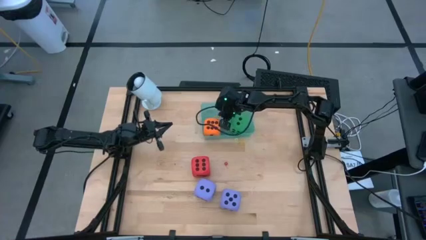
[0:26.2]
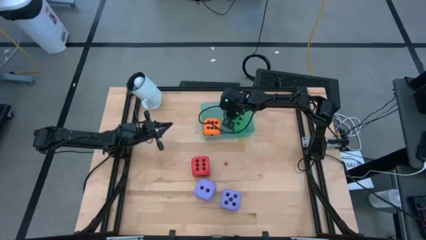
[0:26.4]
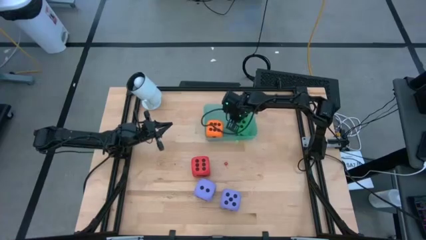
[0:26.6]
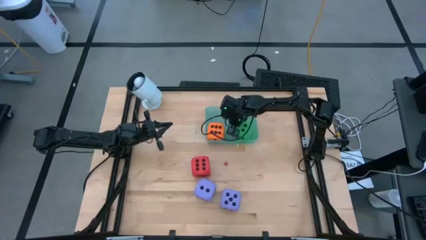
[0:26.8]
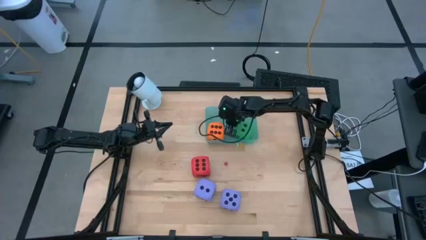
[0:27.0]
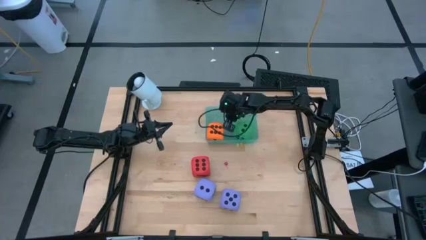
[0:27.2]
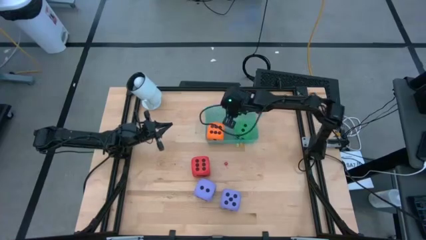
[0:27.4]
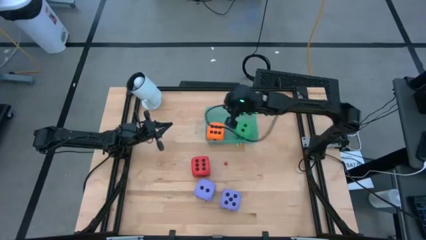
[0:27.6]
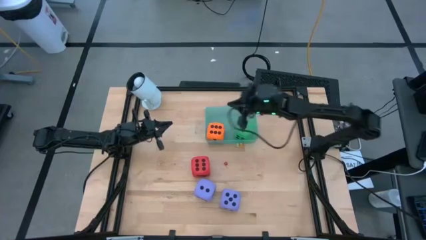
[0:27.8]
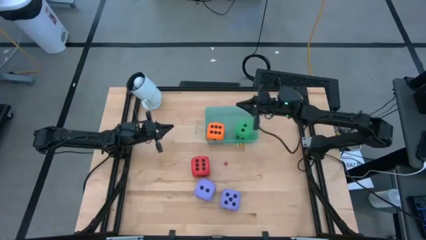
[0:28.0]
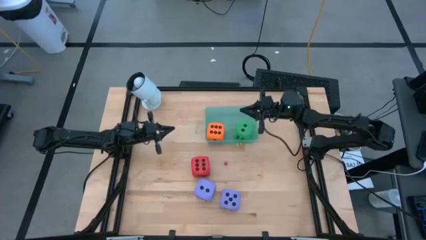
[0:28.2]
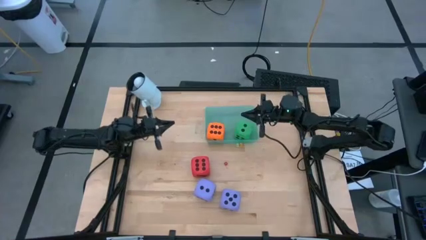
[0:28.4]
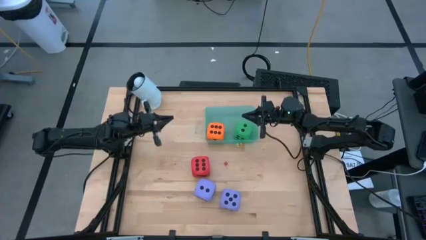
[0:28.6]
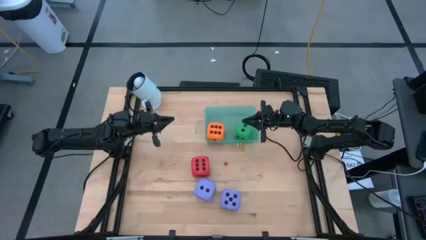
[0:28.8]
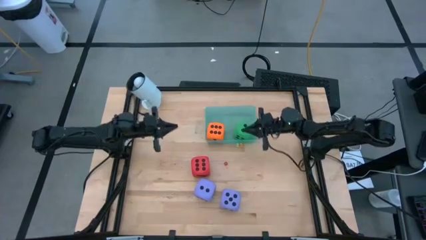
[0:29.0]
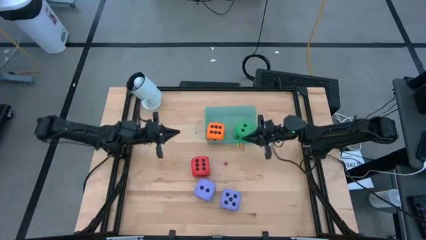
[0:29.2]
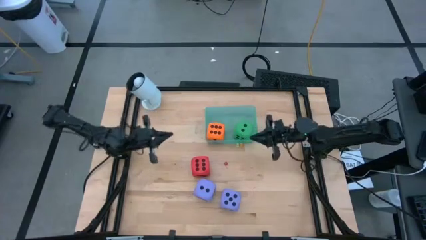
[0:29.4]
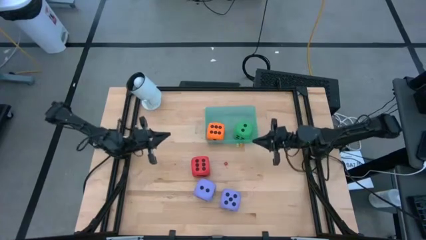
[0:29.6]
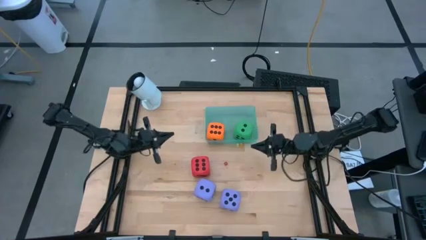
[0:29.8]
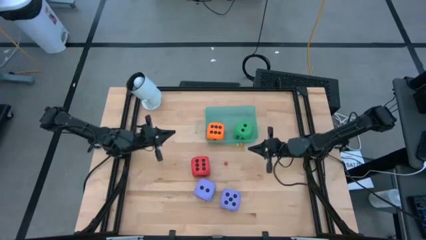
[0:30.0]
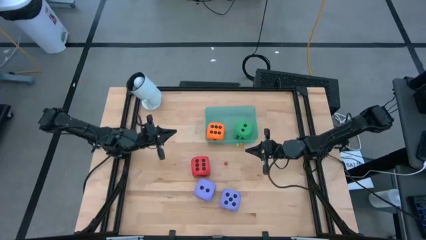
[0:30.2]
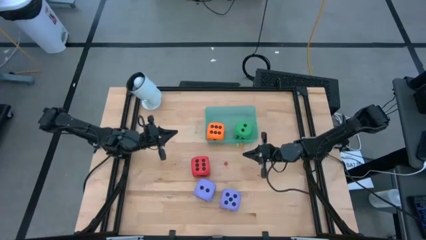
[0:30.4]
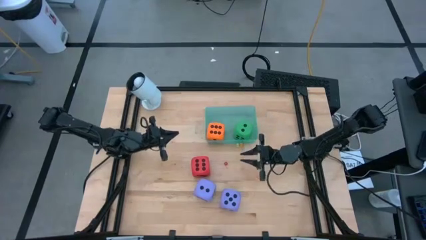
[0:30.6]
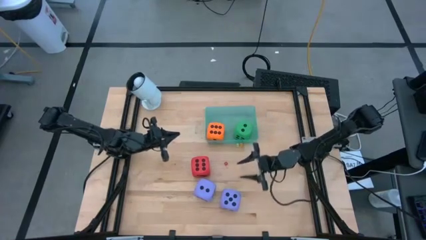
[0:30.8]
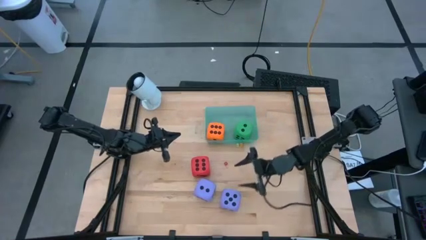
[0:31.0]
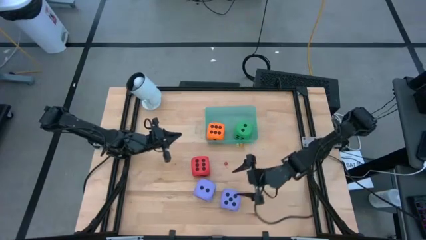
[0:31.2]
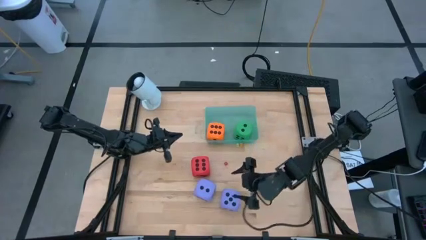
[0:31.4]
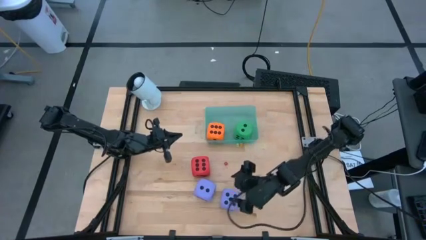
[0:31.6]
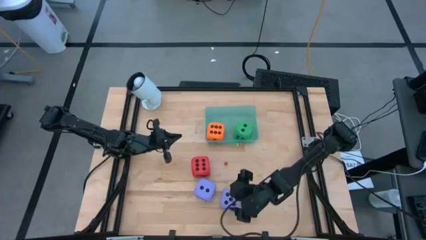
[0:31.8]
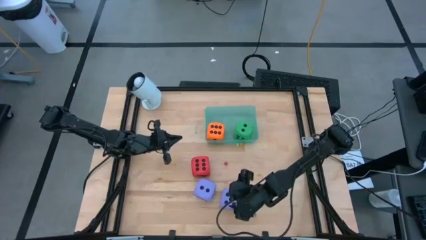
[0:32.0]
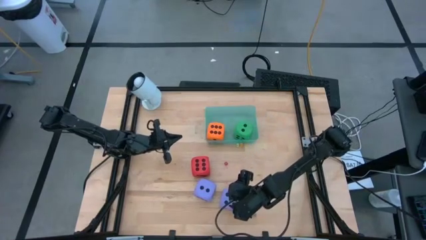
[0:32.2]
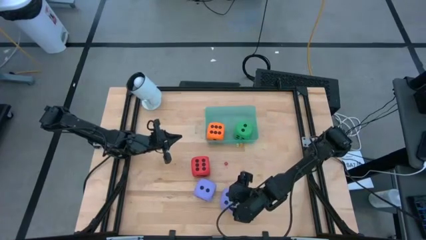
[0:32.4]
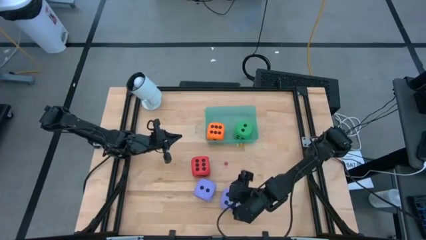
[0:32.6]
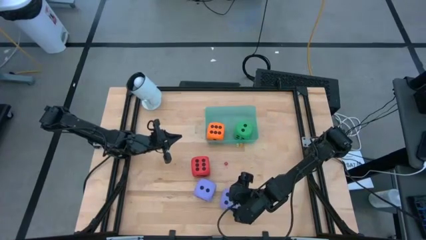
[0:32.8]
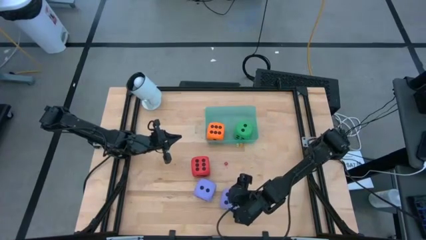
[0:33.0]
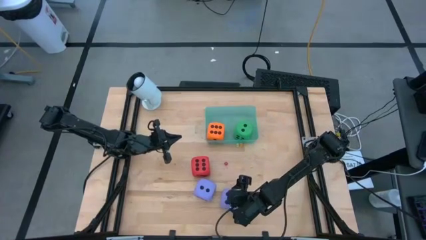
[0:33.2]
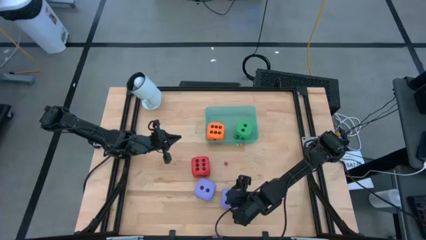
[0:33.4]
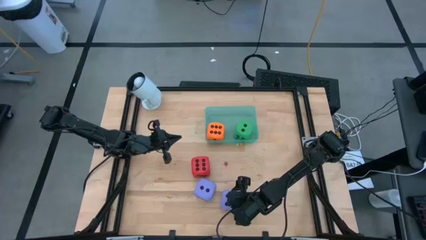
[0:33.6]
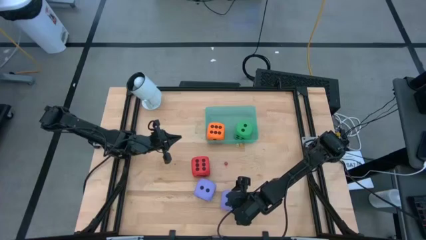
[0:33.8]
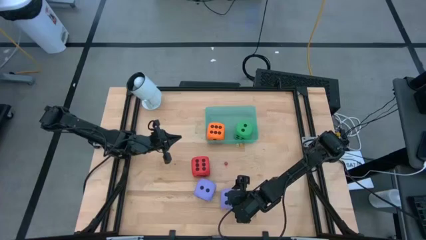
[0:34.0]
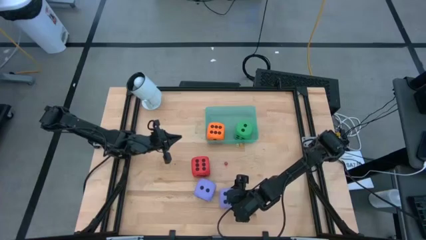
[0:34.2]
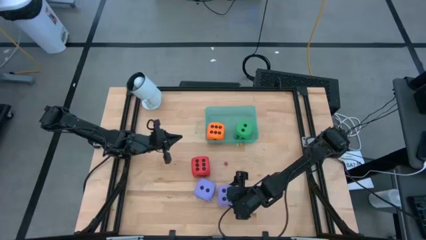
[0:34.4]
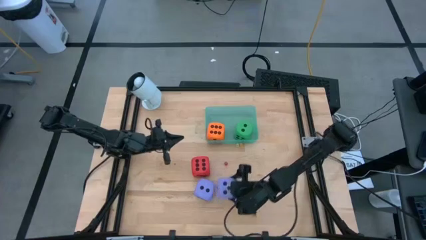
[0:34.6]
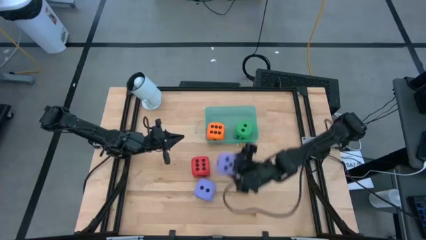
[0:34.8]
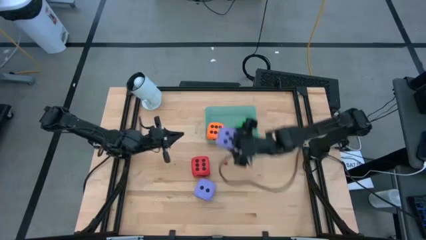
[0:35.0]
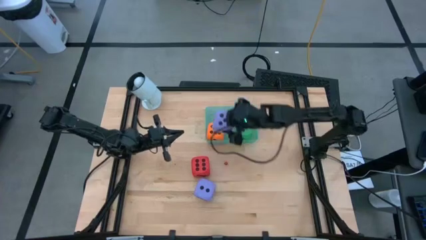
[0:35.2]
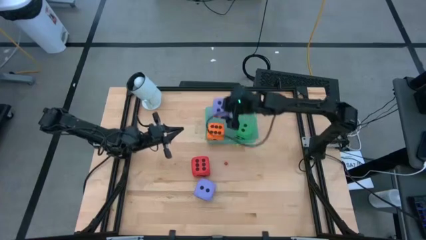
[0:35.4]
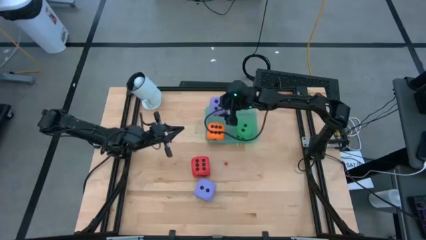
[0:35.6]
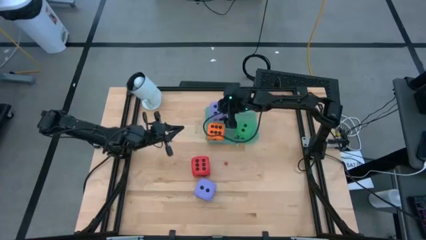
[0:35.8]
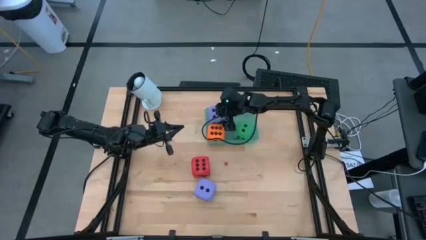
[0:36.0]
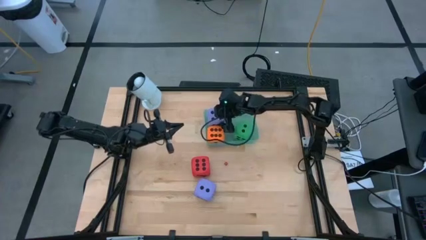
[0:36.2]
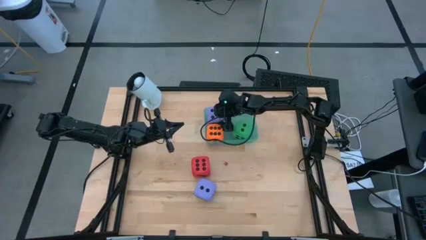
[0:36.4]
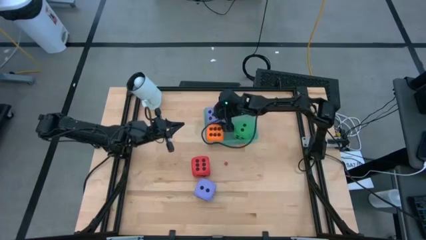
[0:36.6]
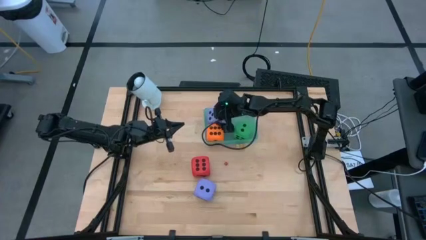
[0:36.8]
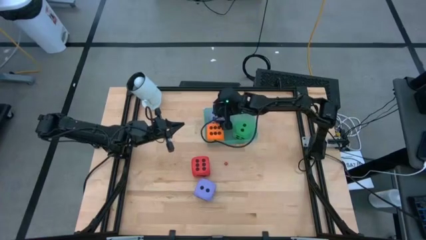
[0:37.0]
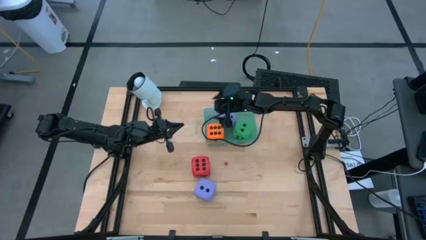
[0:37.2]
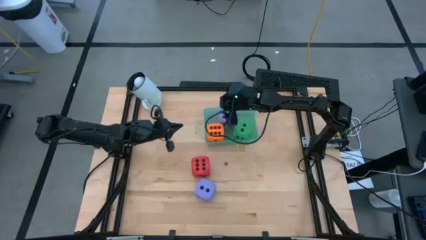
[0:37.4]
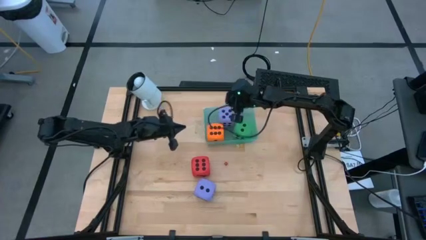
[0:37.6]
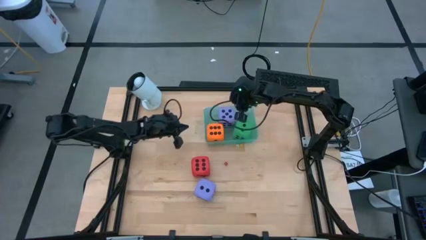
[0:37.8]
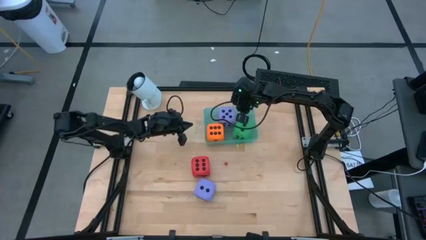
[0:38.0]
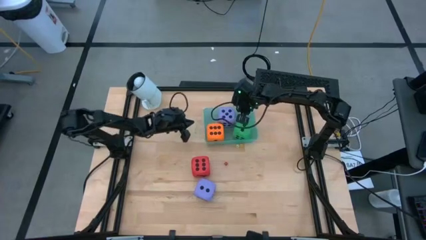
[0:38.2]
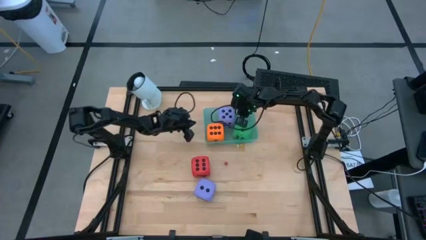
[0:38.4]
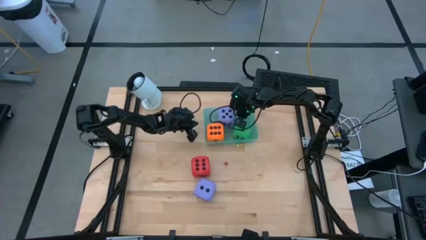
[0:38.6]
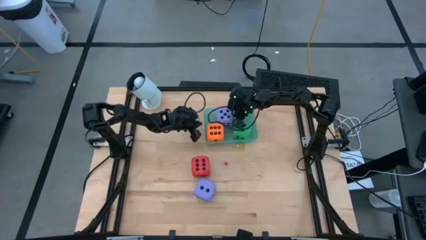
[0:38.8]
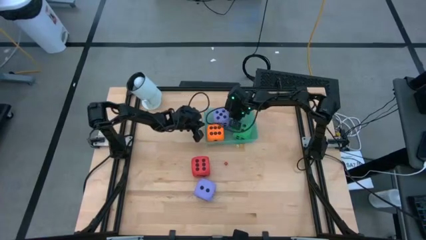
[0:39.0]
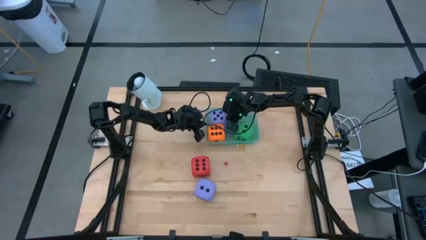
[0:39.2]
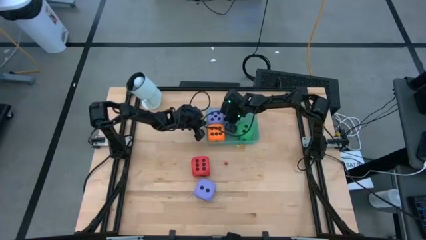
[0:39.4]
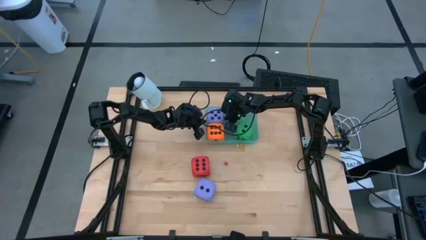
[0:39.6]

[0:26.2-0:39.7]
Task: Pick & Place Dice
Put the big purple die into the green bin

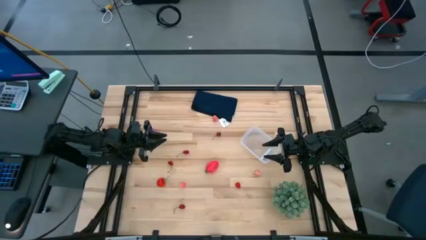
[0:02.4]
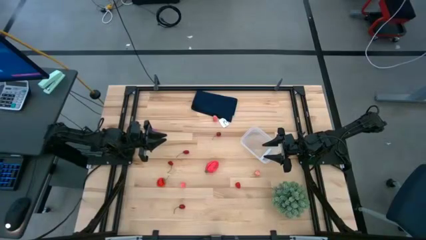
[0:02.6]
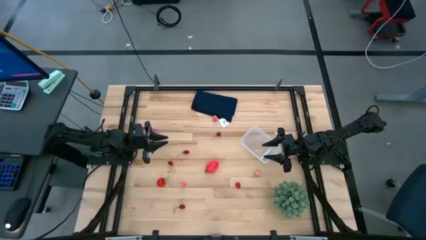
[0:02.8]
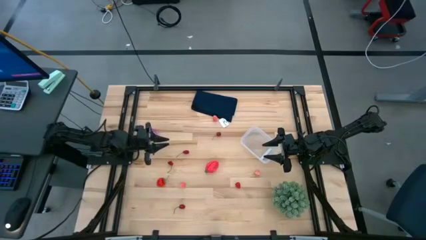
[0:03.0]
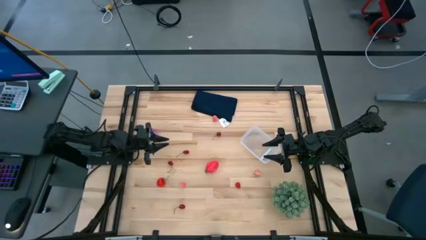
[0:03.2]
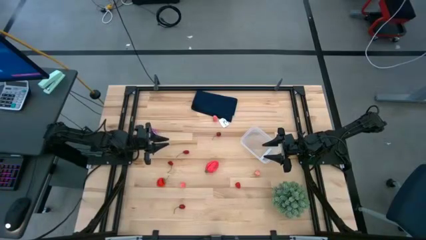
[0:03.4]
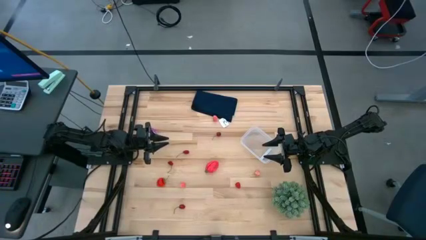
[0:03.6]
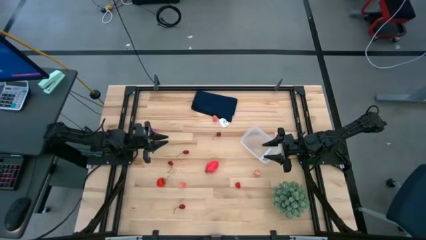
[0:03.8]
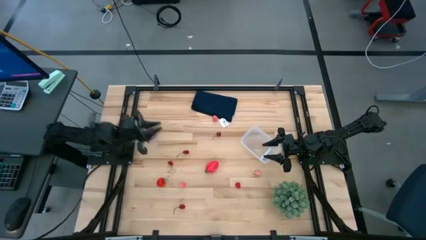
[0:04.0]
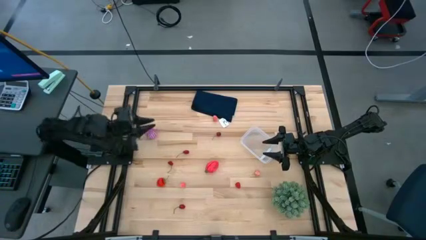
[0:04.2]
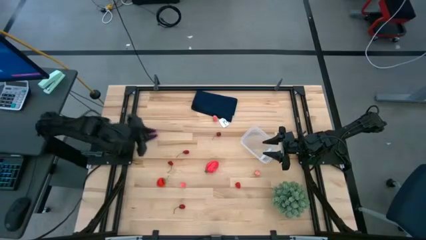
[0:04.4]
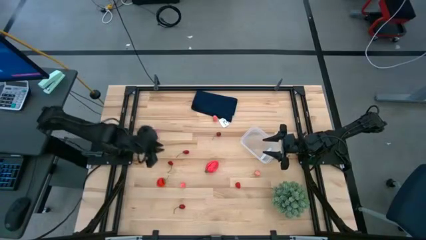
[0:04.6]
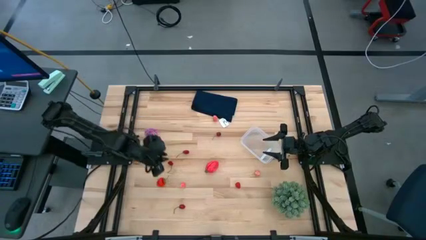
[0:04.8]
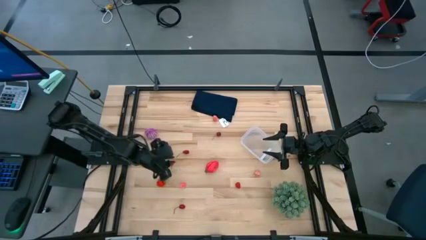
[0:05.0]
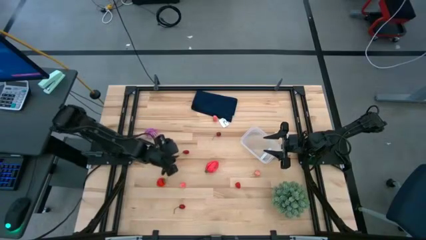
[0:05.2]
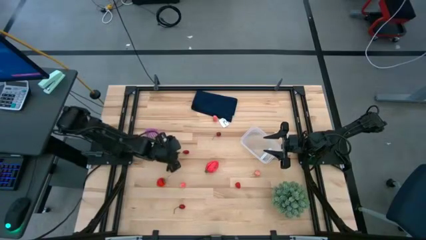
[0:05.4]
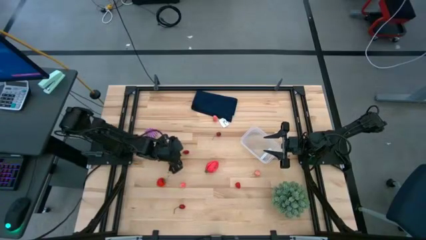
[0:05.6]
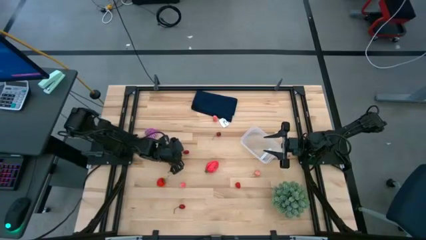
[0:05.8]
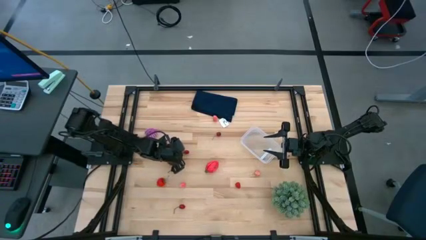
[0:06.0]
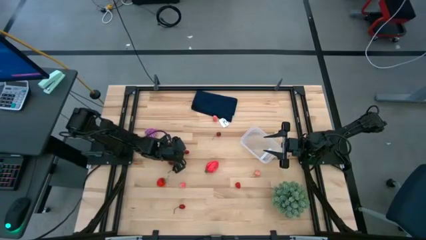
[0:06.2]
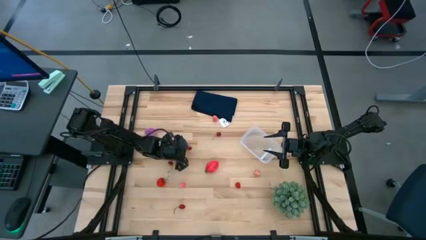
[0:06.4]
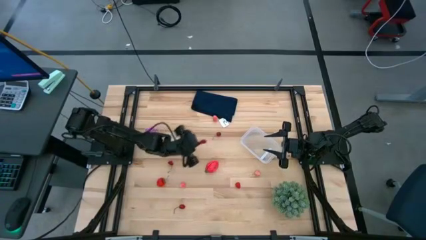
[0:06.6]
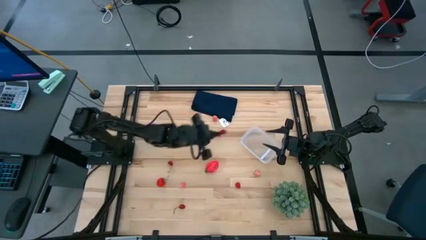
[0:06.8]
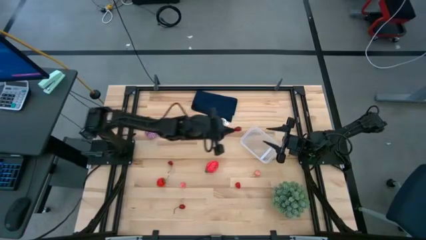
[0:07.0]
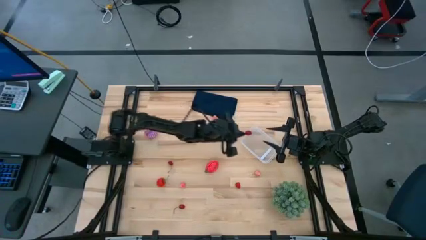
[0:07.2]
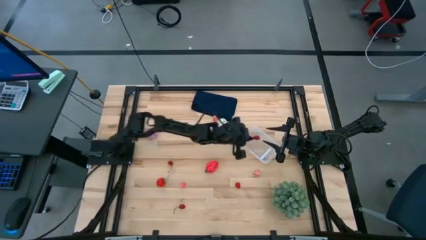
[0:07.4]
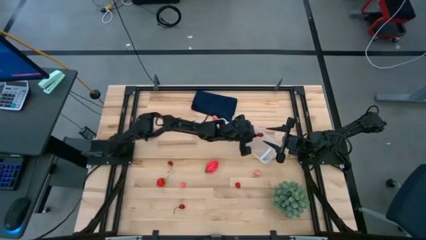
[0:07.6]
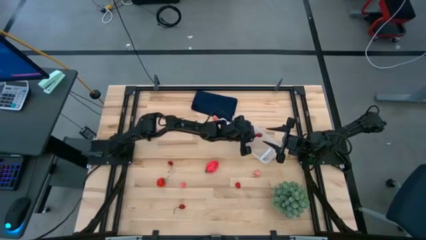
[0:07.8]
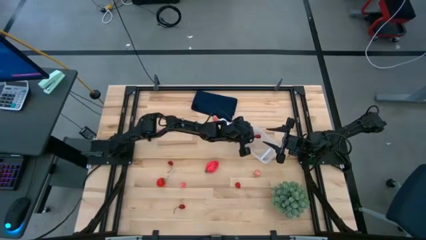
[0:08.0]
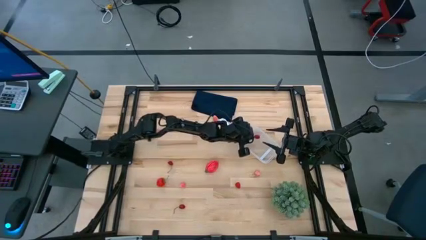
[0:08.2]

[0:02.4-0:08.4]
Task: Pick and placing Produce into tupperware
Put the cherry into the transparent bin
